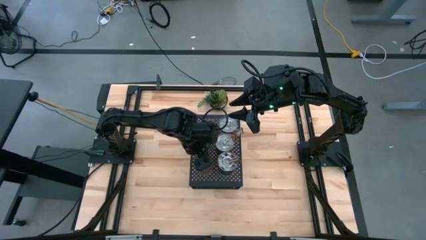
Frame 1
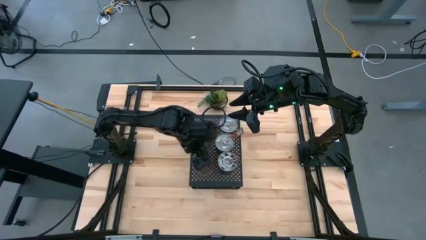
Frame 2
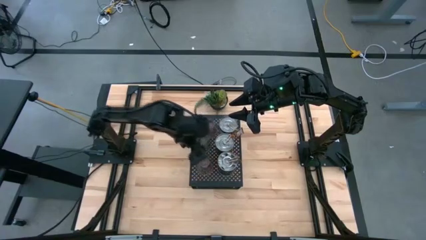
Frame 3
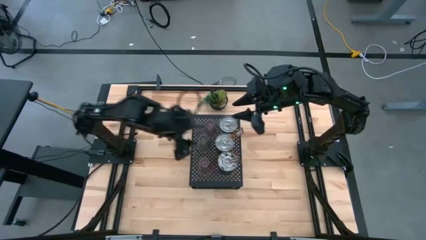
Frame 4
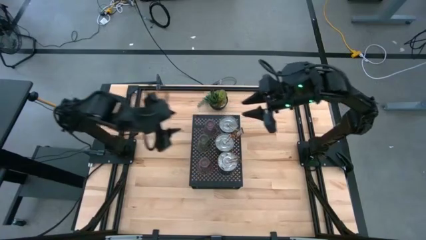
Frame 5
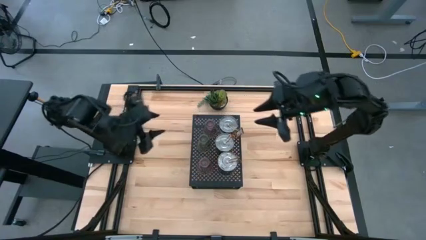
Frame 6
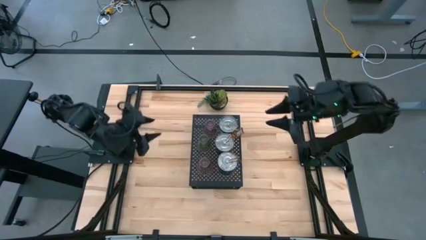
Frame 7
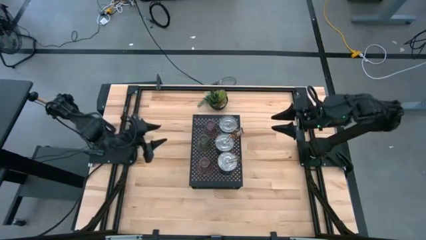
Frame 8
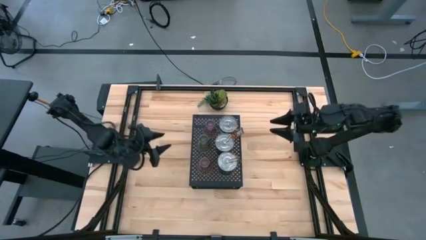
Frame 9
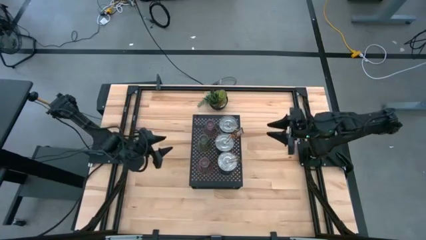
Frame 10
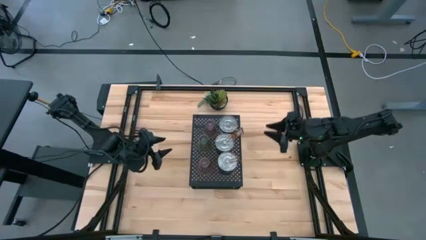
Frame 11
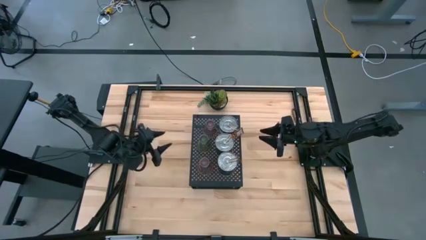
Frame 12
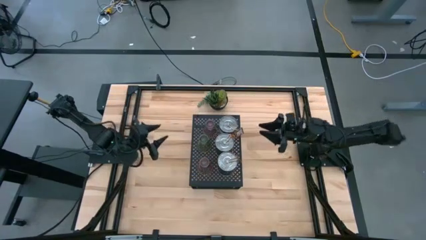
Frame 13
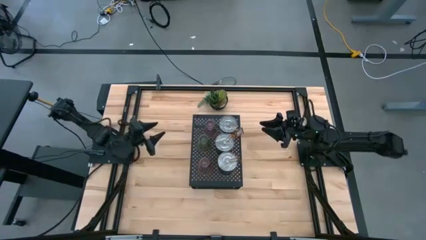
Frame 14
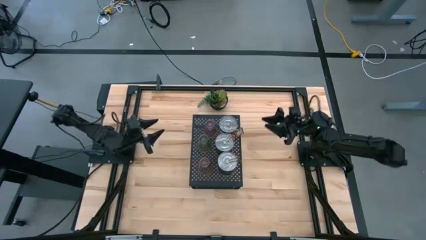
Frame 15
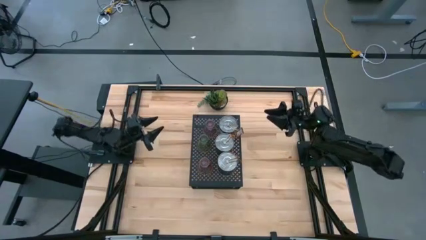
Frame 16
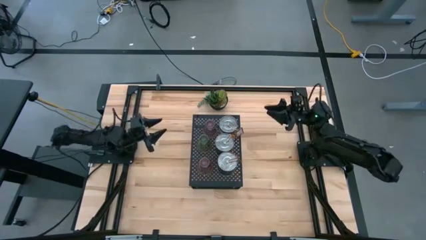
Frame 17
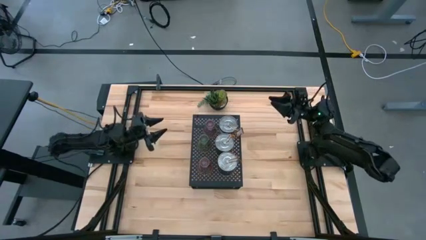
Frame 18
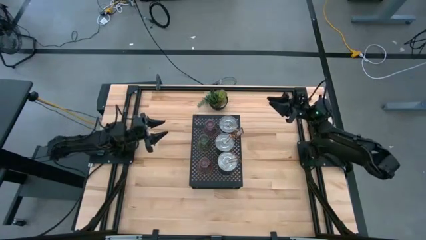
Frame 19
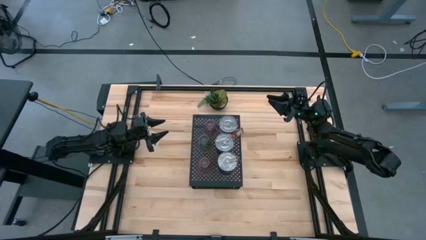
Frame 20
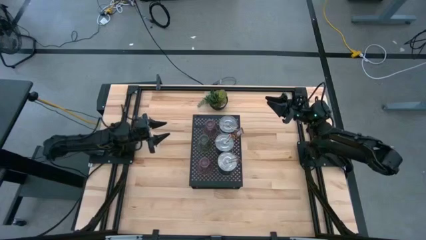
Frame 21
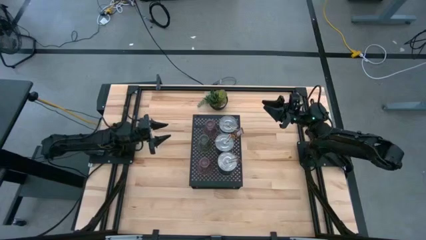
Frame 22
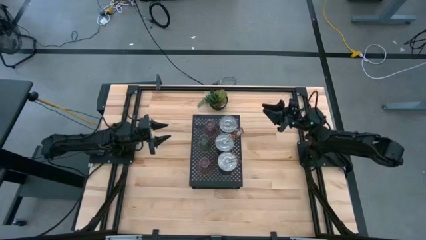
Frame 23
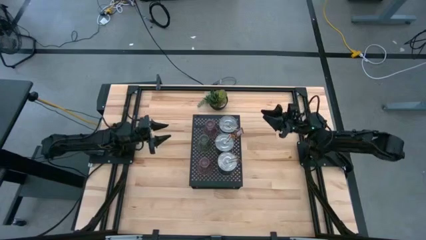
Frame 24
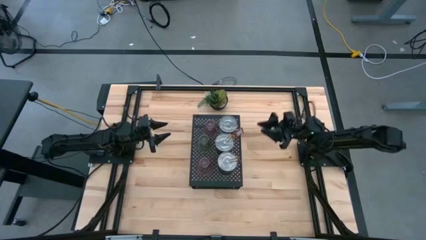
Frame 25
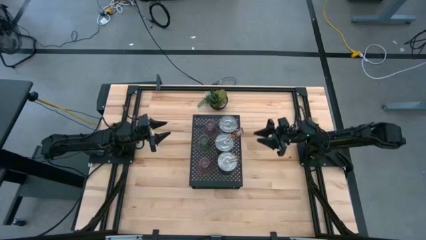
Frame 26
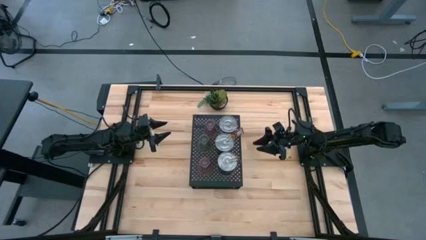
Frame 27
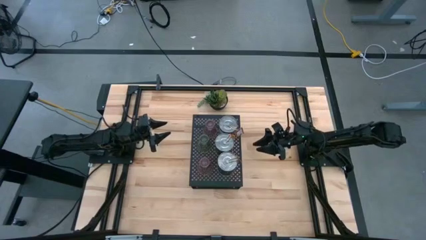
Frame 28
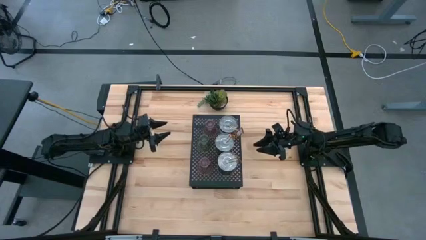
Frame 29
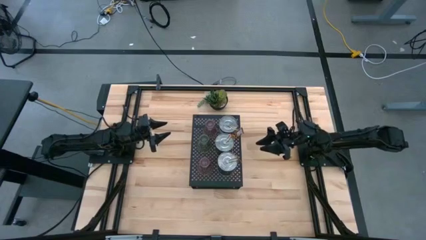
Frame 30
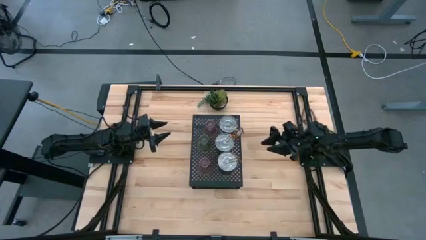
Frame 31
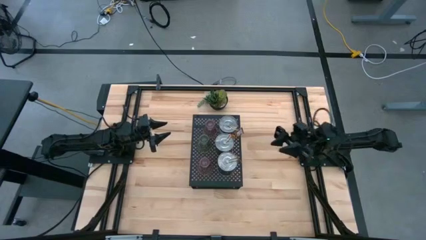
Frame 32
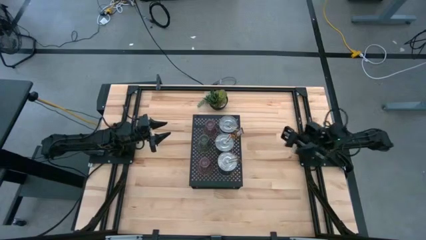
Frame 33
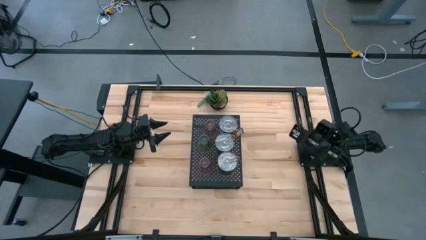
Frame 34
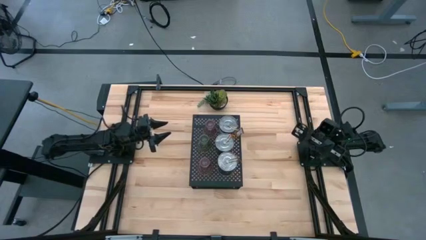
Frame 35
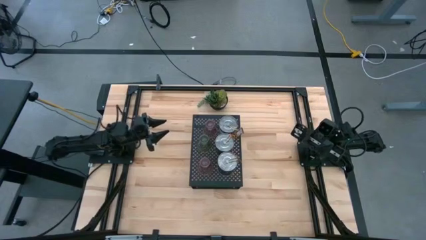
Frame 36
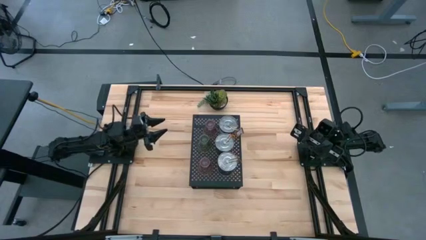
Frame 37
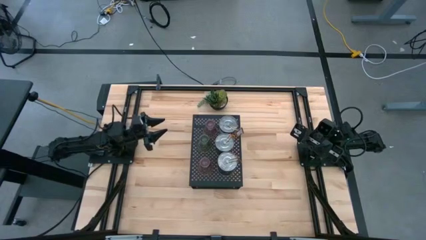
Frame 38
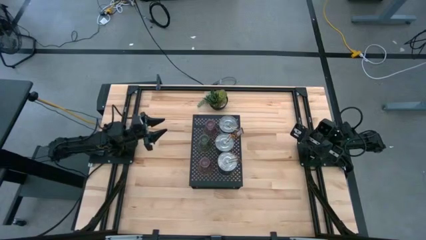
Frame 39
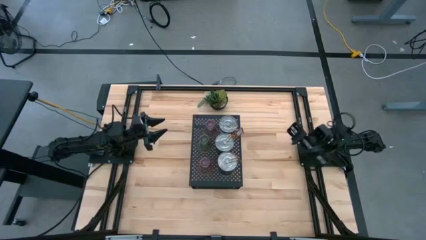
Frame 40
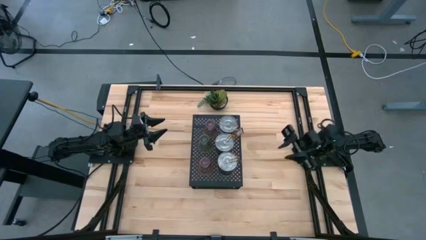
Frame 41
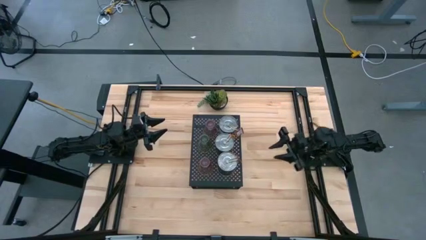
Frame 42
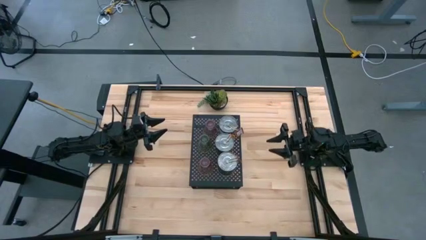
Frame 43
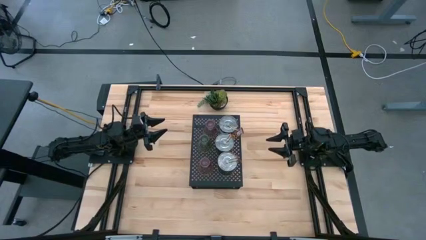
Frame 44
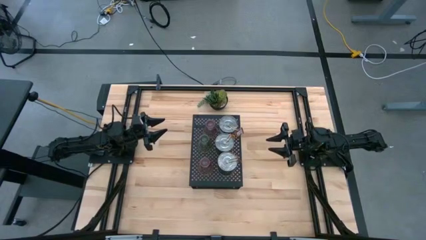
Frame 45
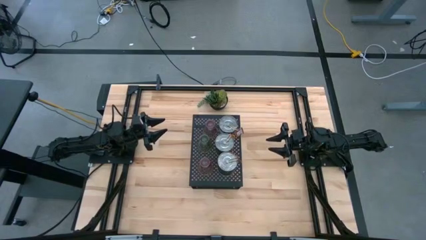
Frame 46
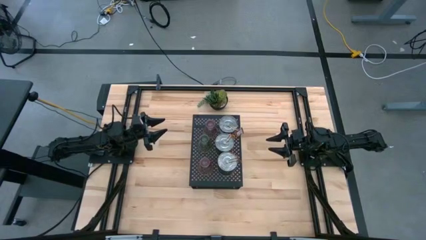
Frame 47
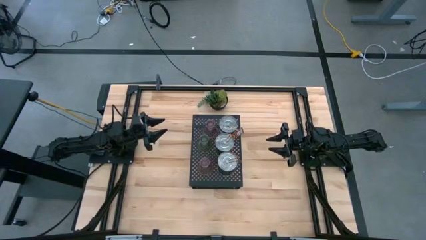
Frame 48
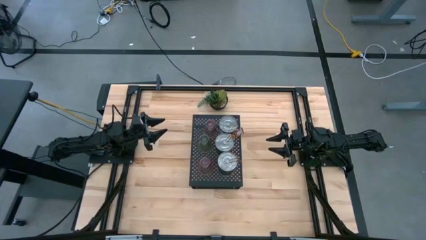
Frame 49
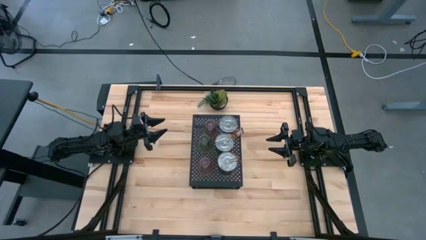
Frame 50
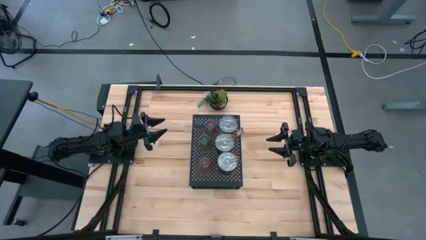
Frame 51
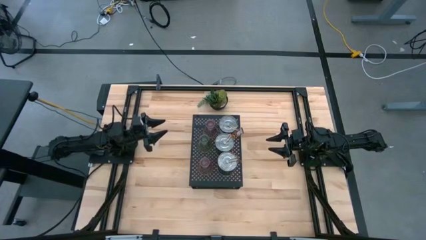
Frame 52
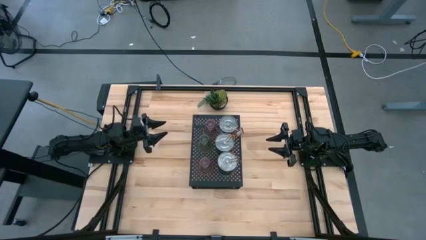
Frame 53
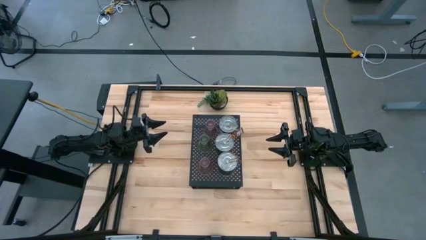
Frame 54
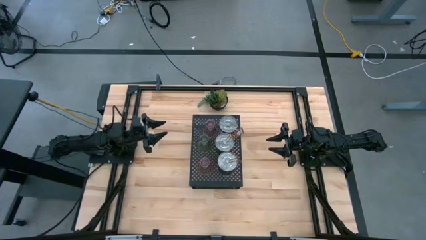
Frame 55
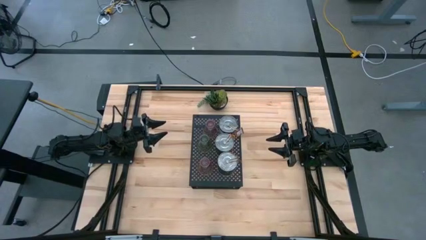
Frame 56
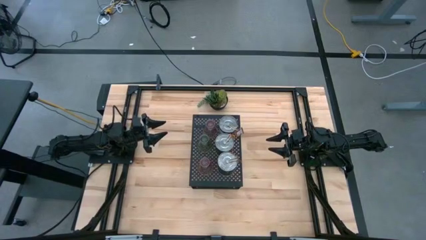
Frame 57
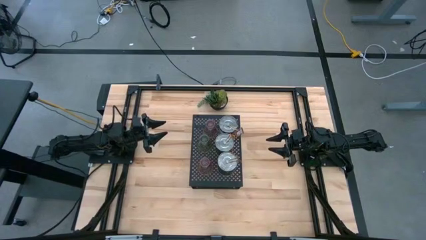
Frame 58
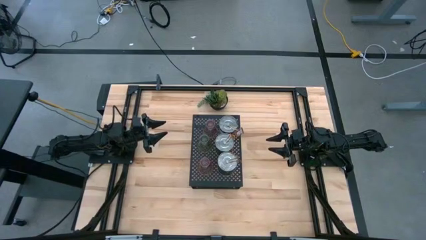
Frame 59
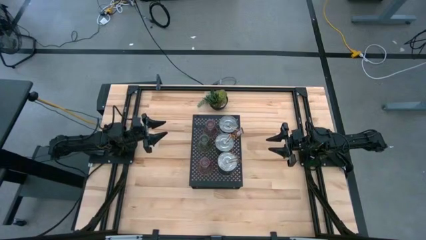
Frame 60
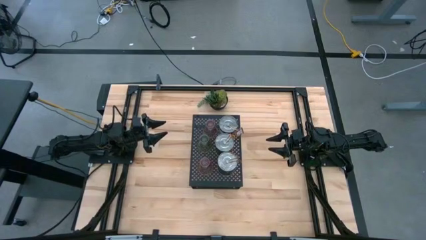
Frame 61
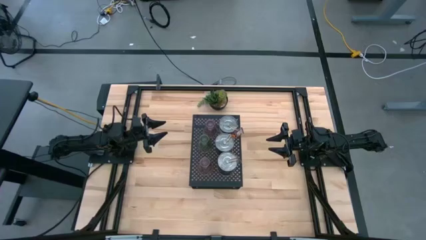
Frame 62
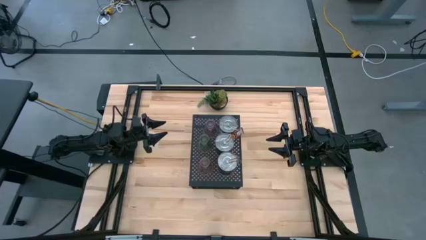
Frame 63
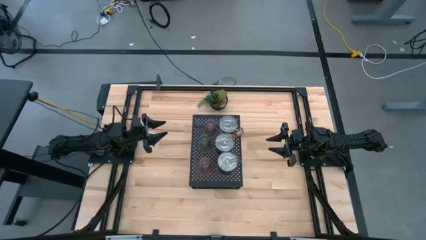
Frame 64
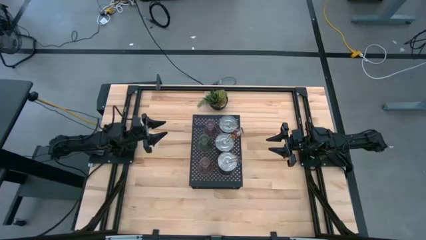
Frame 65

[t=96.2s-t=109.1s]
Task: Pick & Place candle stick holders
Return to Home Position

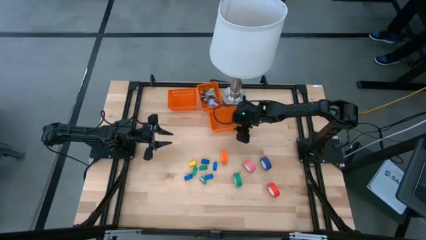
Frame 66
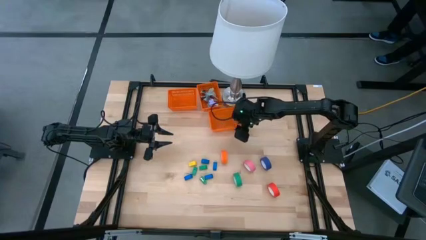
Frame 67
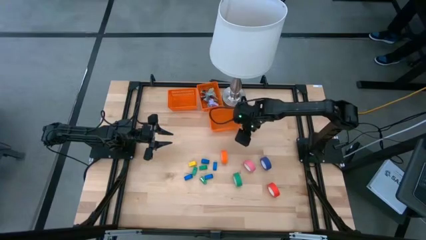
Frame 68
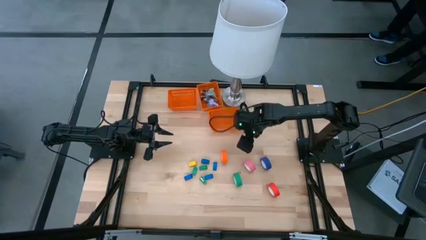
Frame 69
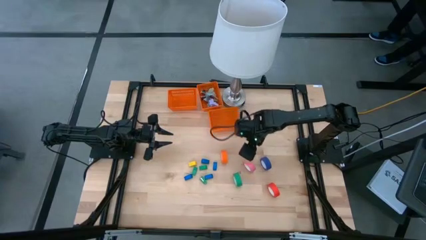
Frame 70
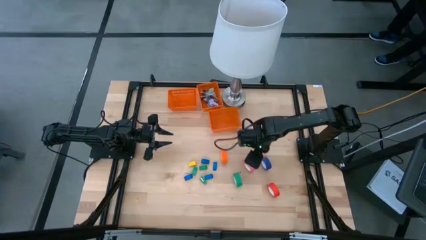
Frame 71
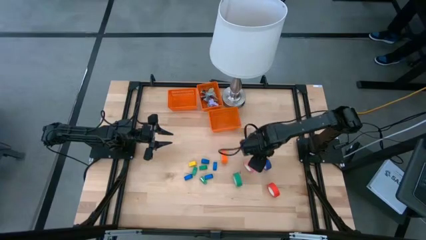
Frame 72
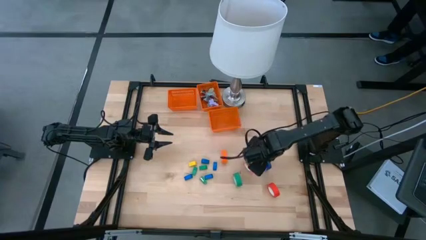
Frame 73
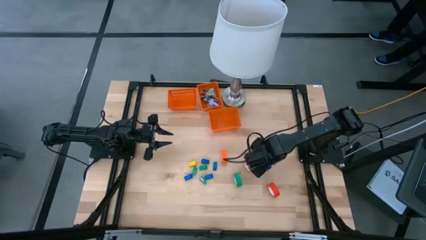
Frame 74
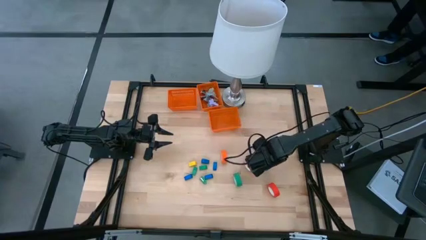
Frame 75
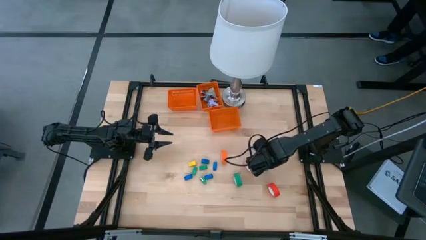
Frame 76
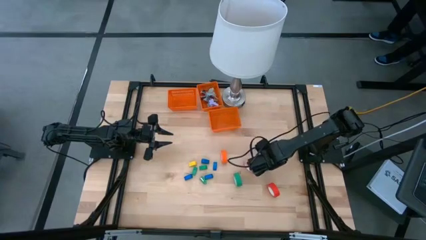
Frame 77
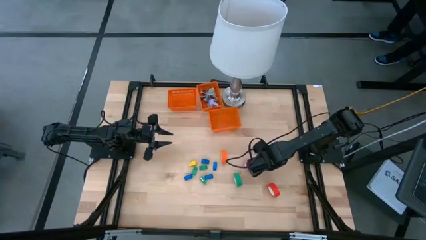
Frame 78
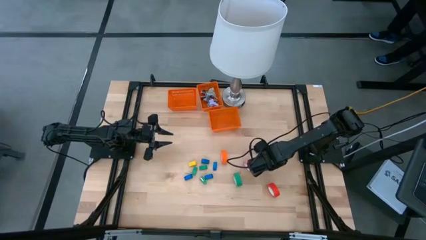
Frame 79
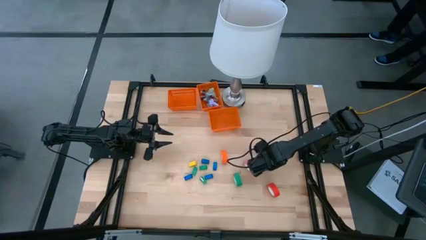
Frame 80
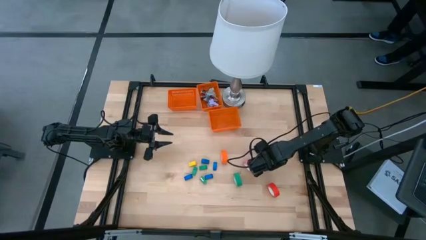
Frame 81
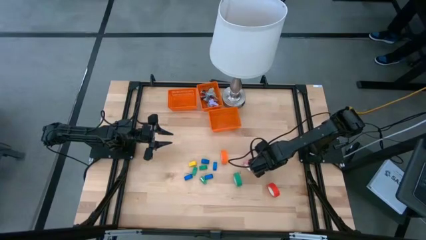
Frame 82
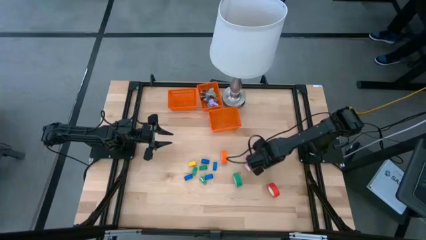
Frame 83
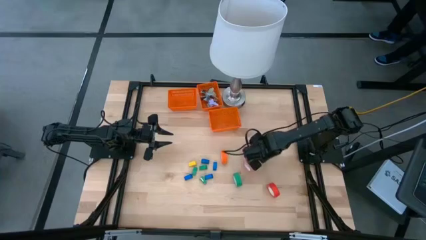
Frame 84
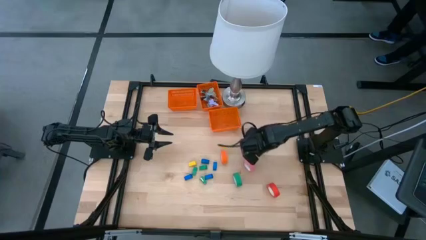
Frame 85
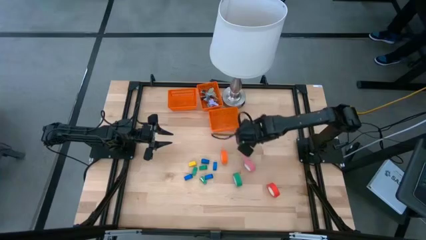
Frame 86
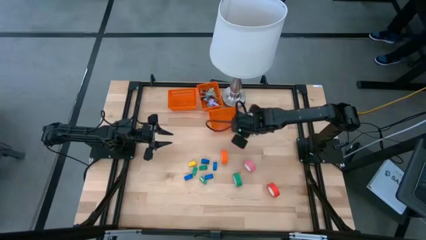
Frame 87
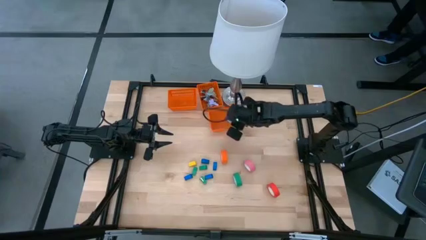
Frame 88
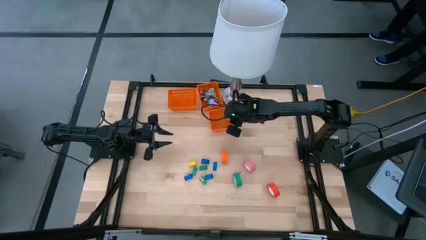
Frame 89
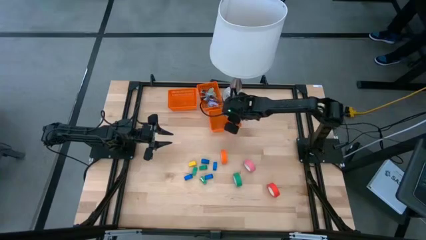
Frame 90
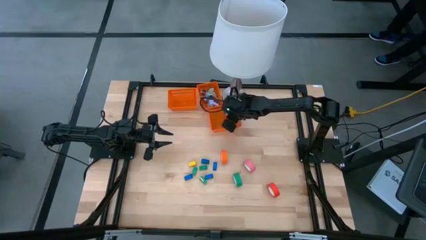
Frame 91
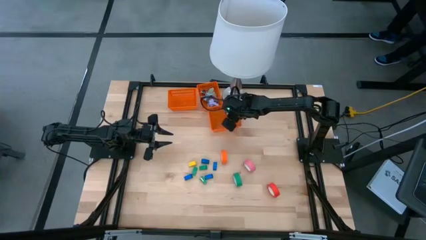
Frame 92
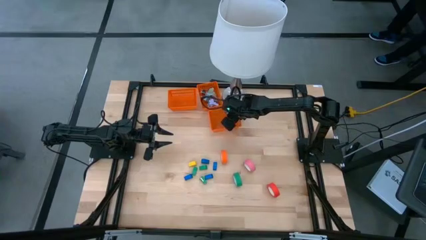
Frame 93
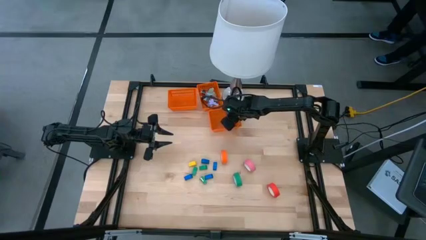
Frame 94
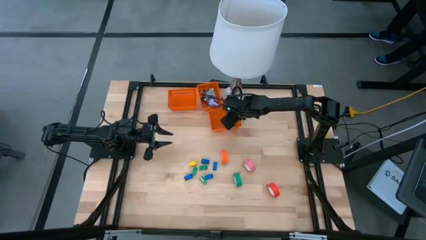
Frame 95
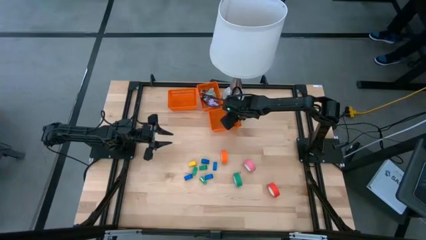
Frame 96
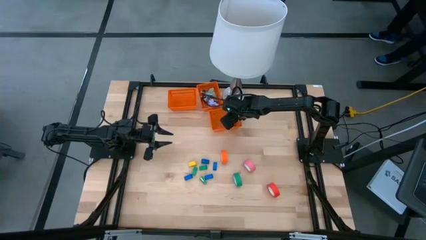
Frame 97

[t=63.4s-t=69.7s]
Task: Pick and place Stapler, Stapler remover, tape
Put the blue tape into the bottom right orange basket
